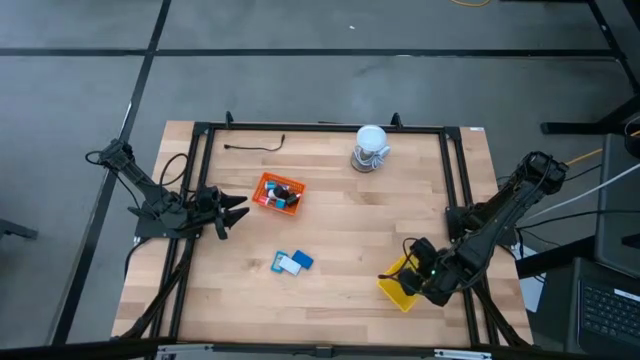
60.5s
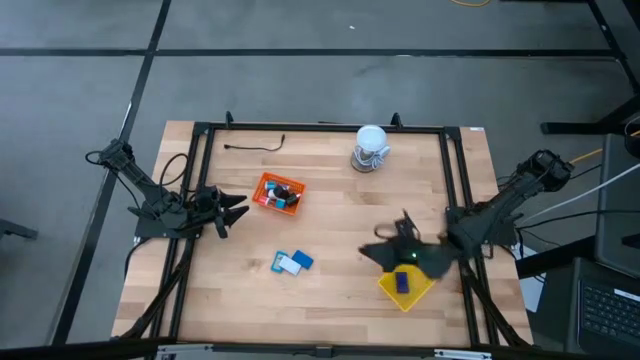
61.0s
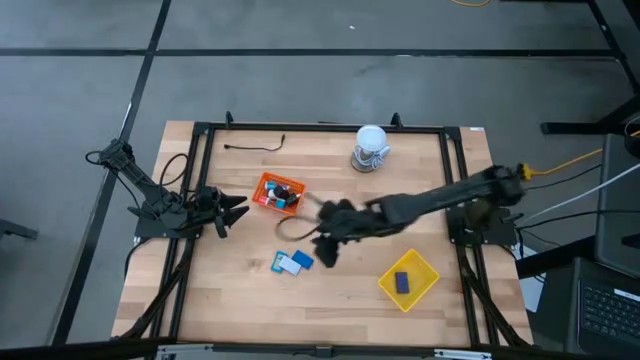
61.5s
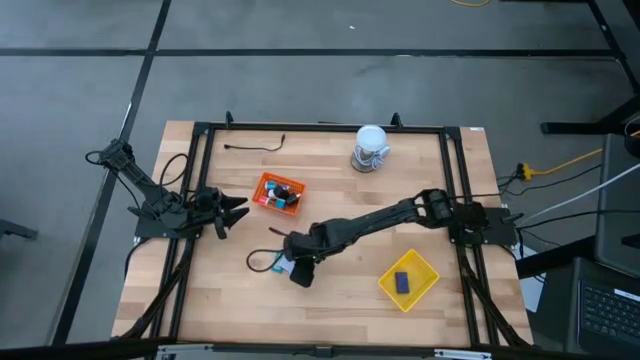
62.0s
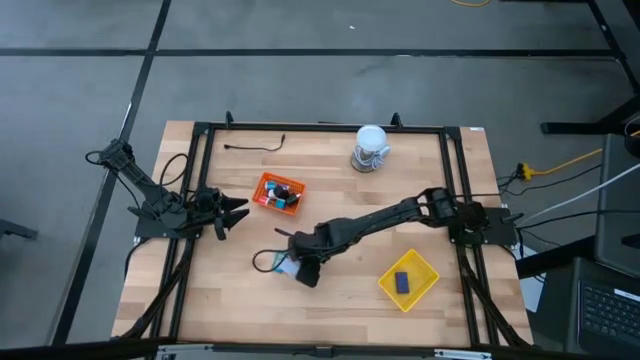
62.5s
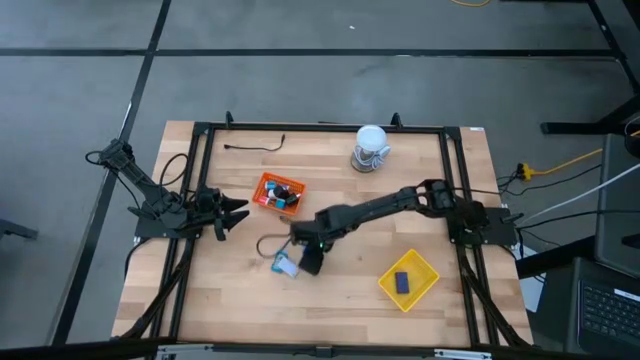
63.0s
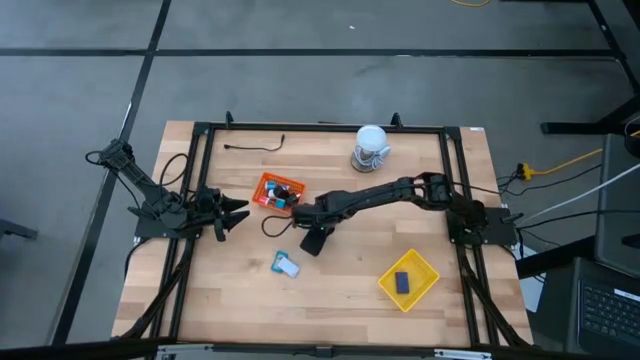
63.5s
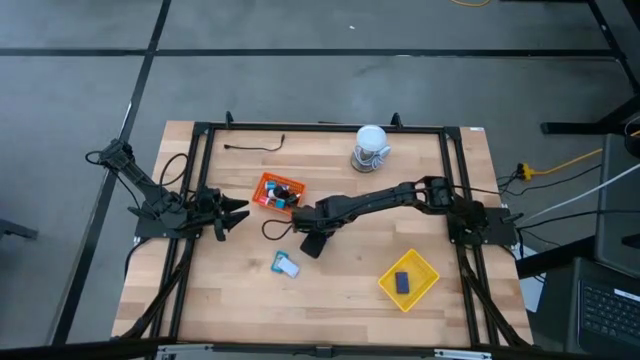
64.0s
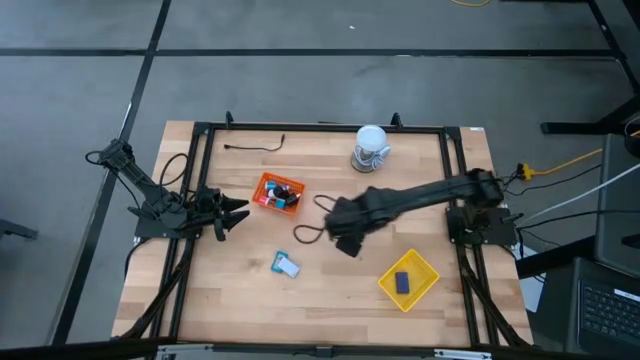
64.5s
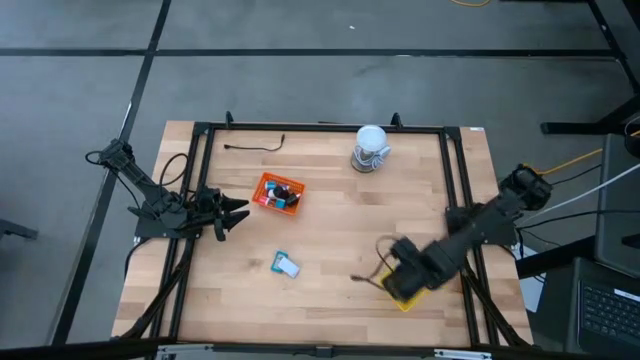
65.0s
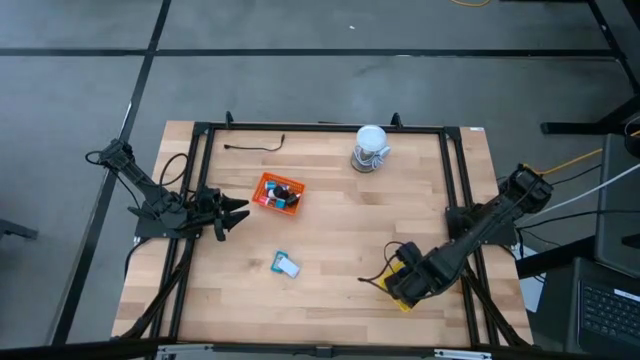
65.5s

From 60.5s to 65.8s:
Task: Pick & Place Office items
Put the blue digital clock into the yellow basket

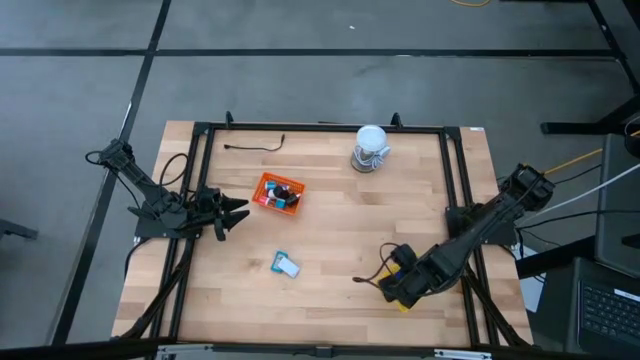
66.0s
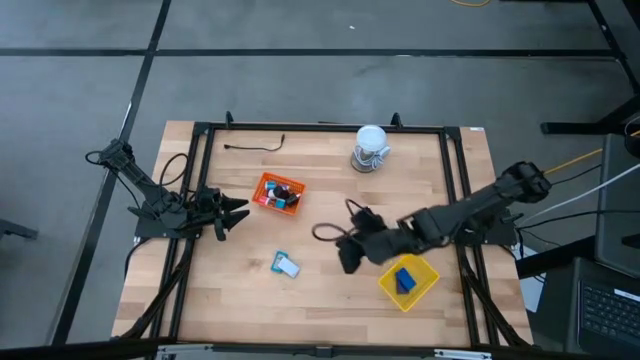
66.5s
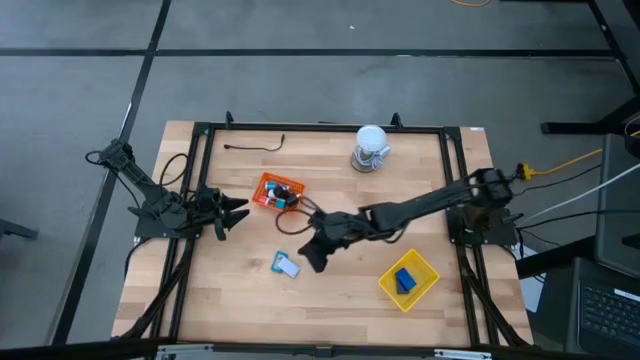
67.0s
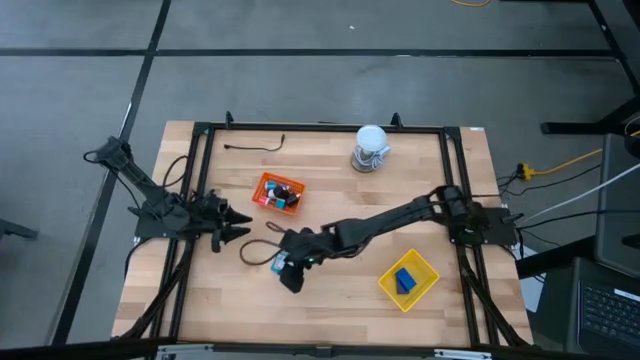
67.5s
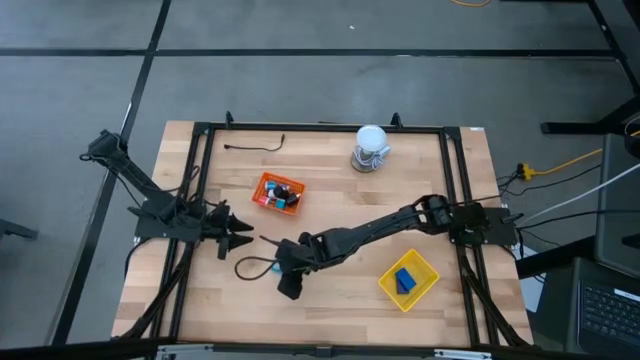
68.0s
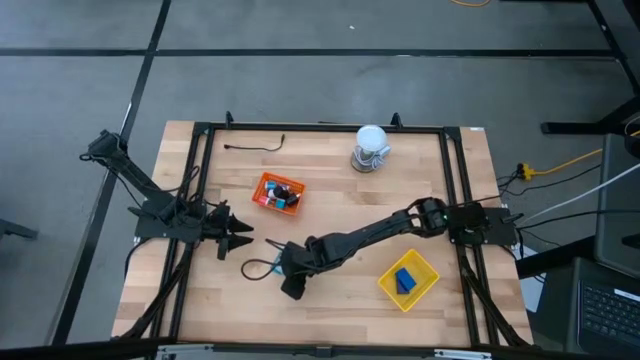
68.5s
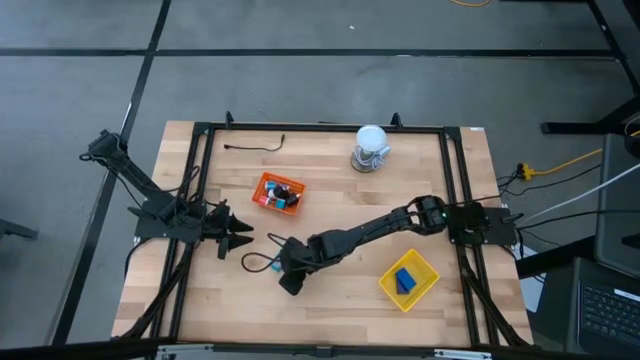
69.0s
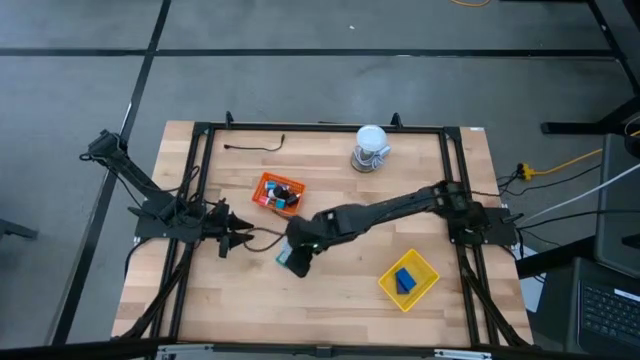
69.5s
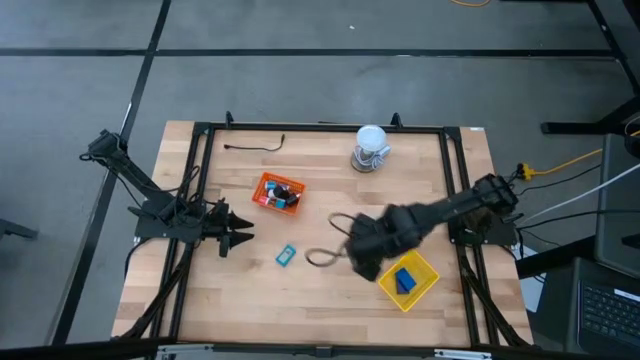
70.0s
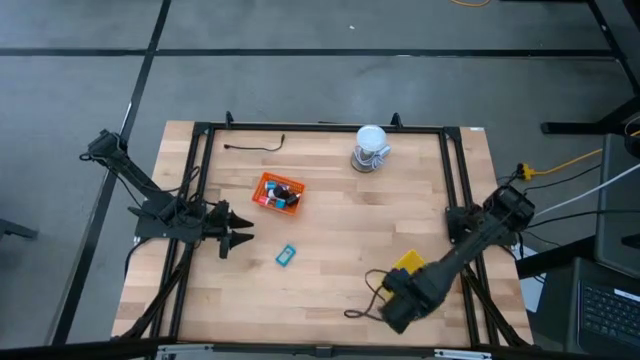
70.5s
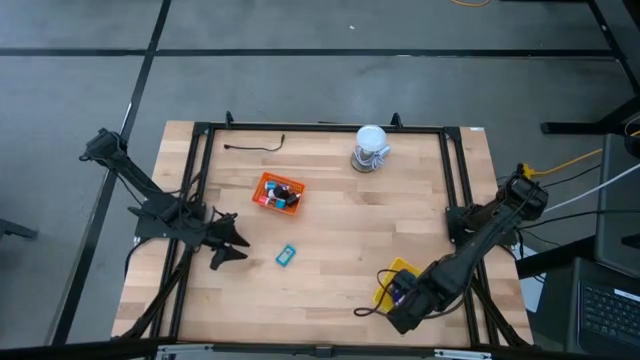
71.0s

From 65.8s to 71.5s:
Put the white digital clock into the yellow basket

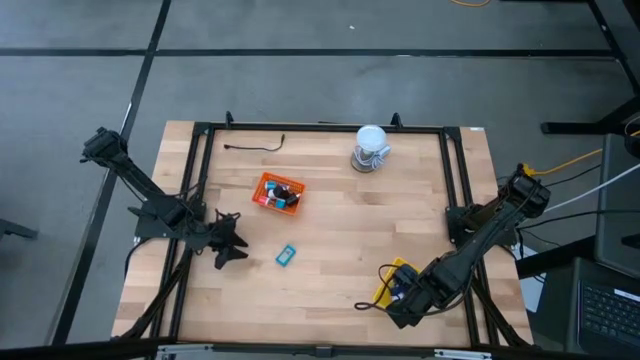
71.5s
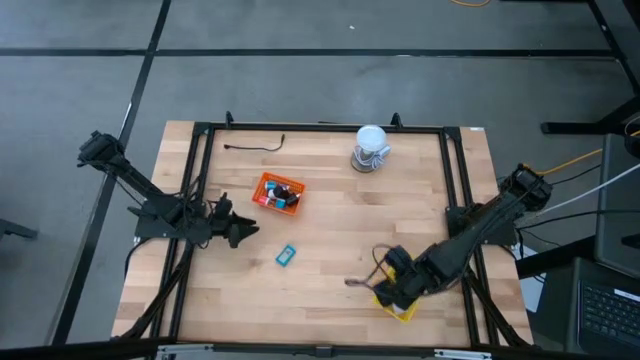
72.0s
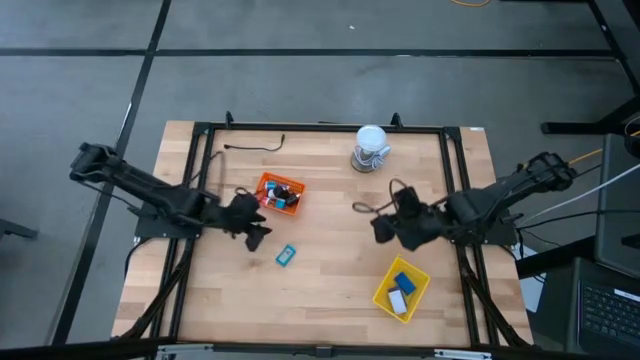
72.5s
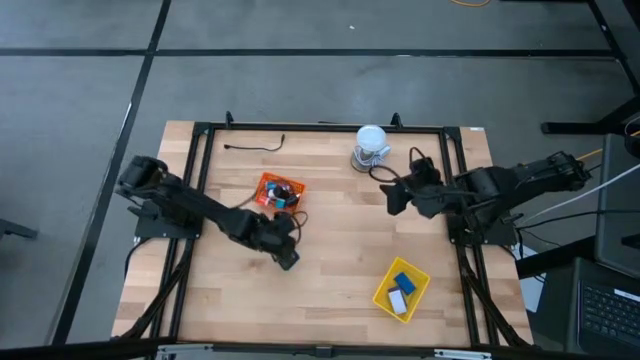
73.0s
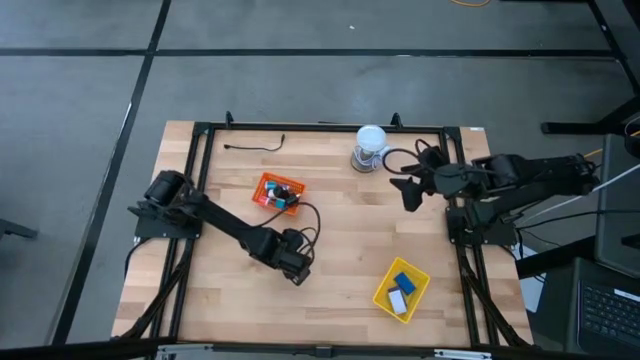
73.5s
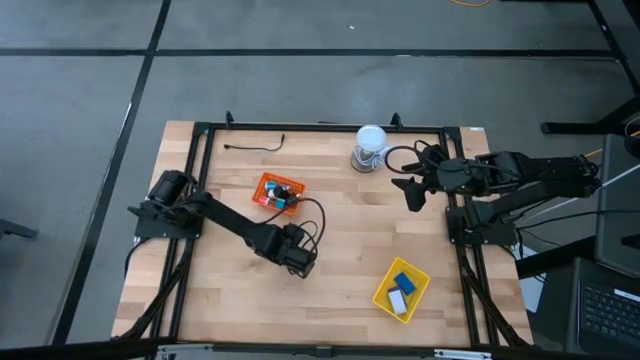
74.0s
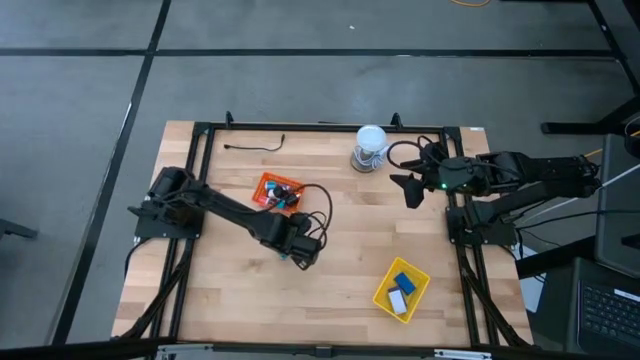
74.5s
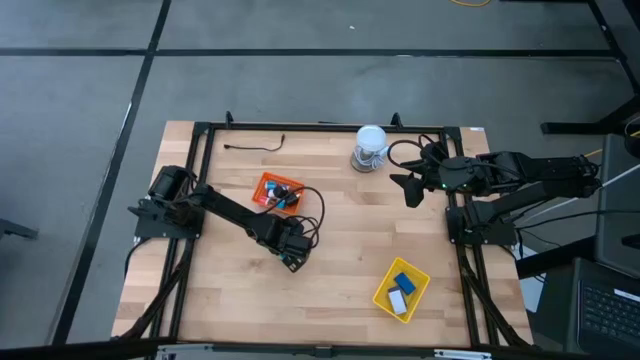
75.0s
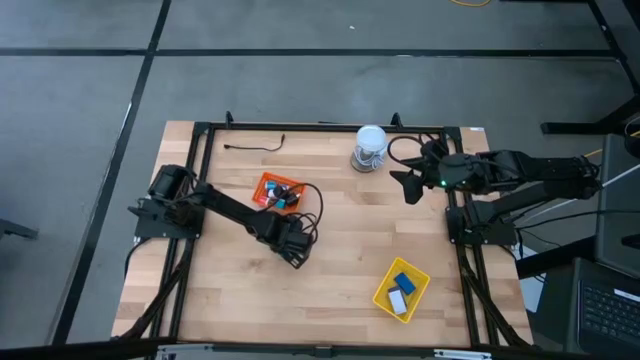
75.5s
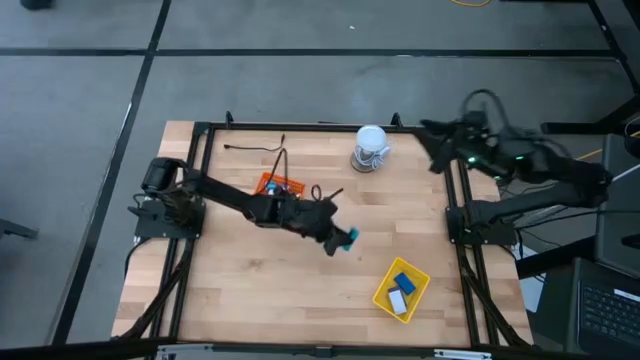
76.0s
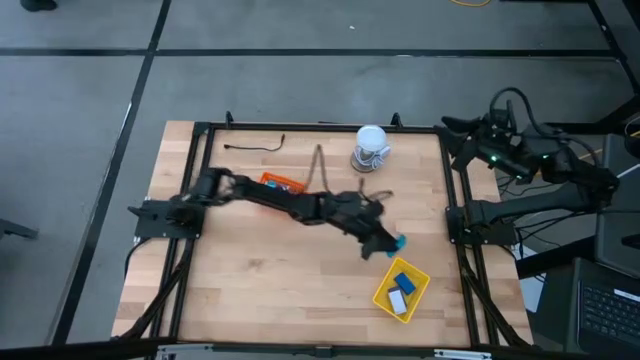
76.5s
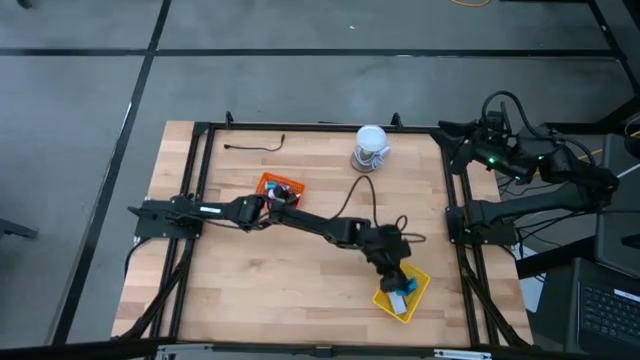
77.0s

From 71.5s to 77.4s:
Put the light blue digital clock into the yellow basket

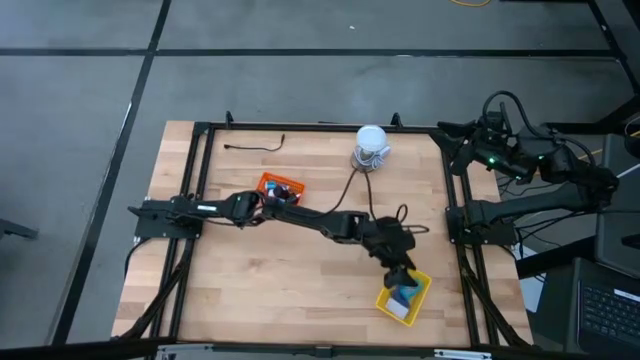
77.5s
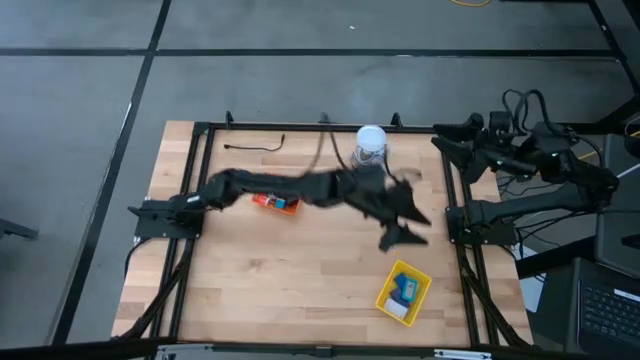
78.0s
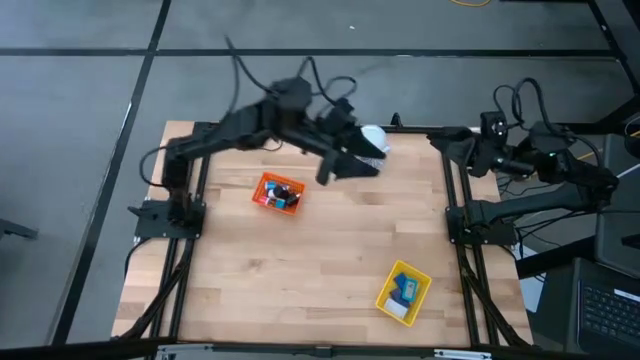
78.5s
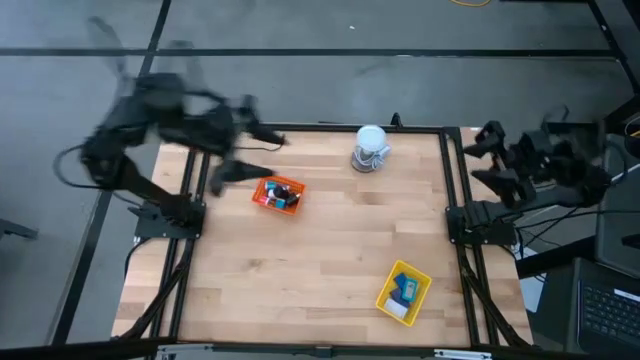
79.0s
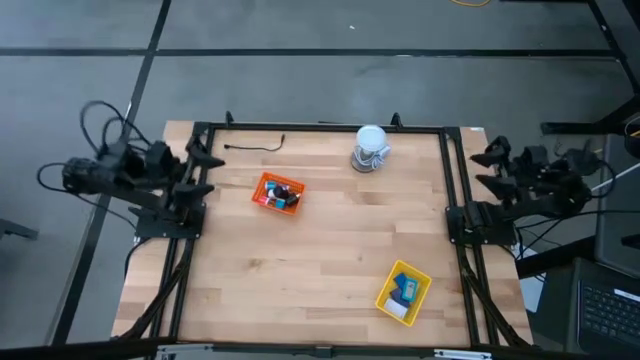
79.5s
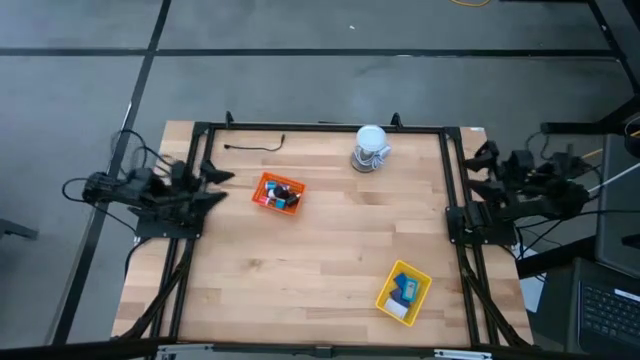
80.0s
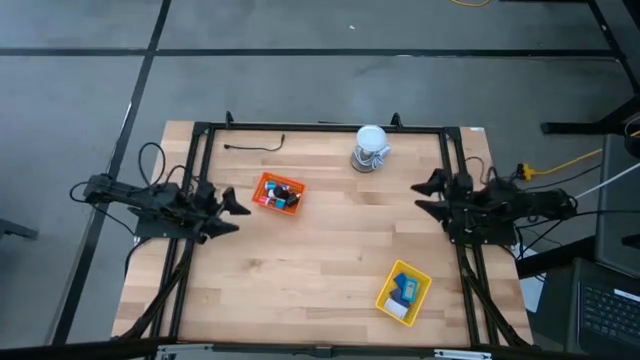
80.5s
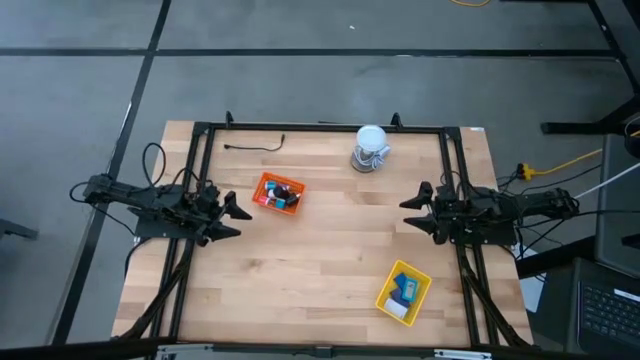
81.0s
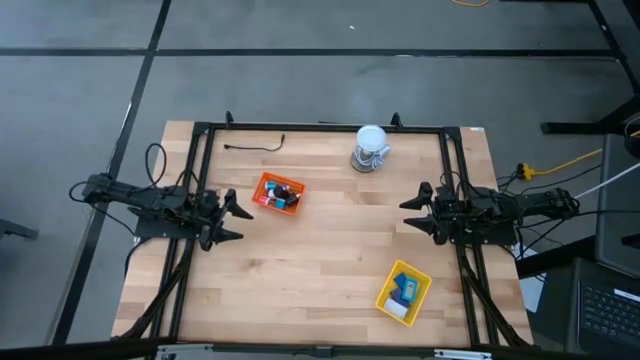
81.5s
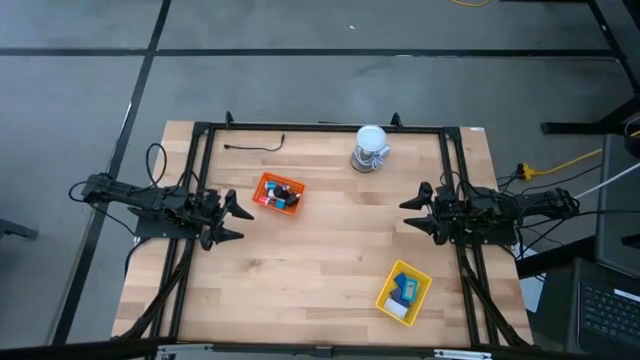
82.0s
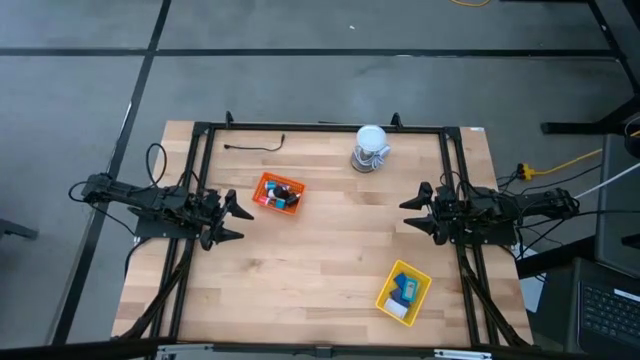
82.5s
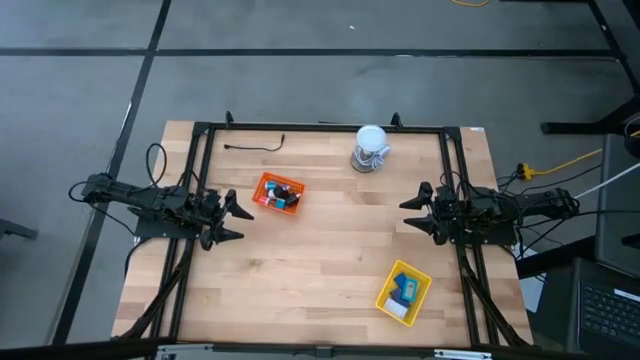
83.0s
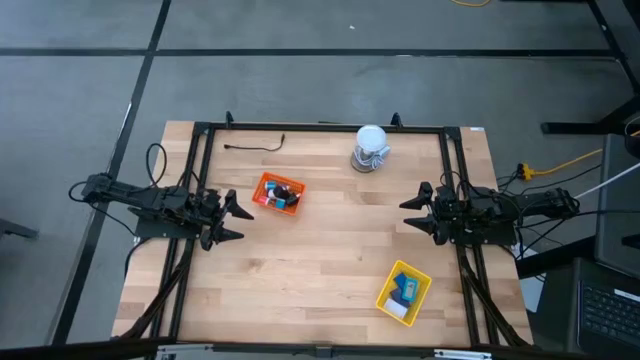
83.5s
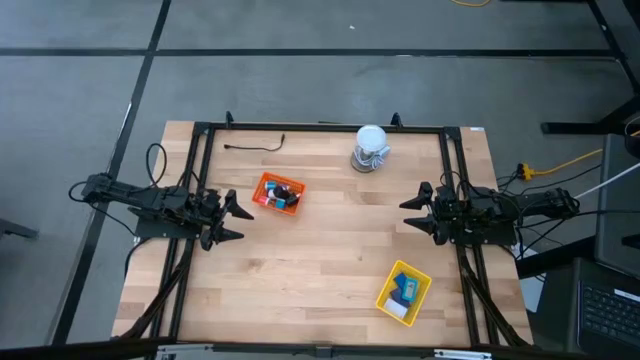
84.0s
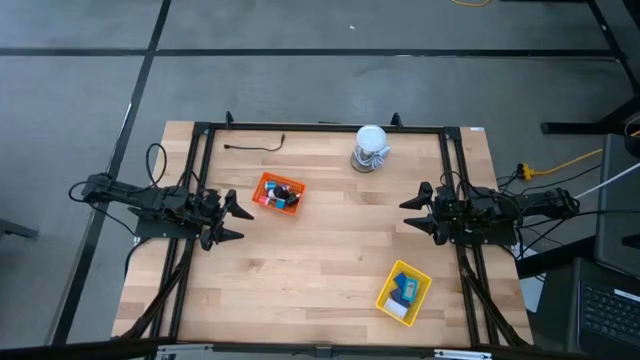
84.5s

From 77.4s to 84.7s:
Return to Home Position
